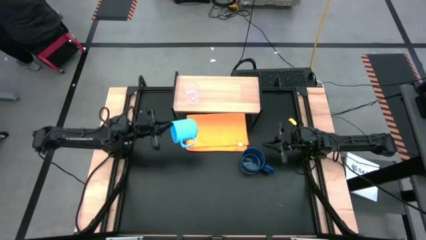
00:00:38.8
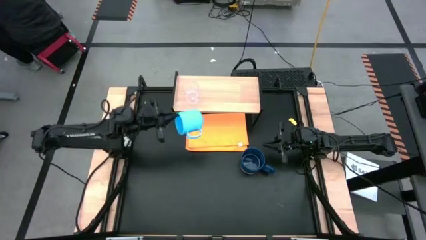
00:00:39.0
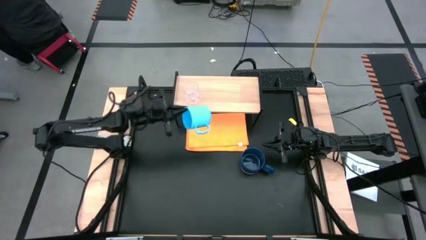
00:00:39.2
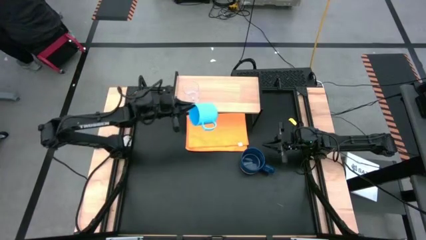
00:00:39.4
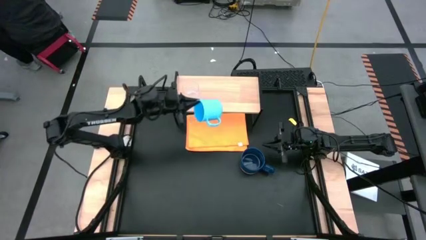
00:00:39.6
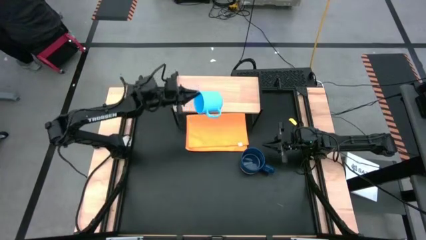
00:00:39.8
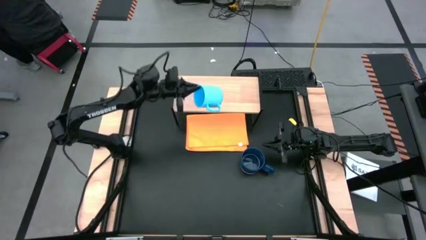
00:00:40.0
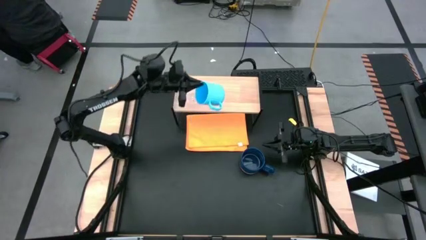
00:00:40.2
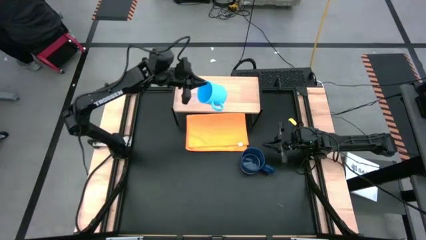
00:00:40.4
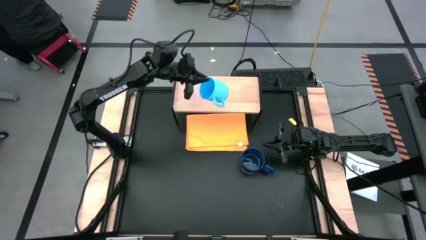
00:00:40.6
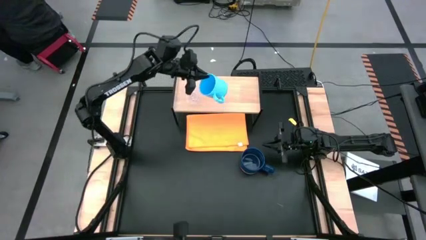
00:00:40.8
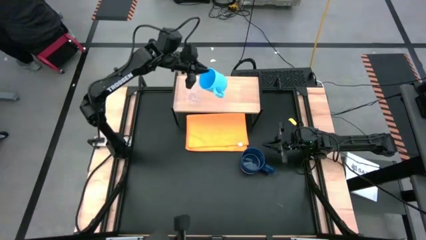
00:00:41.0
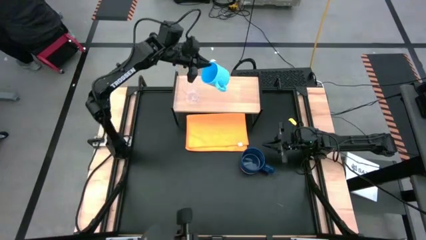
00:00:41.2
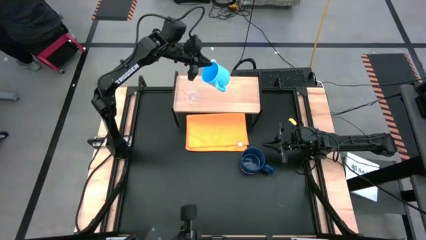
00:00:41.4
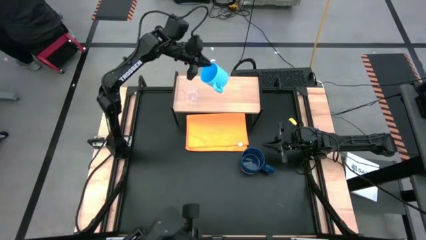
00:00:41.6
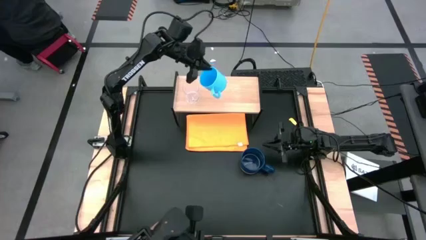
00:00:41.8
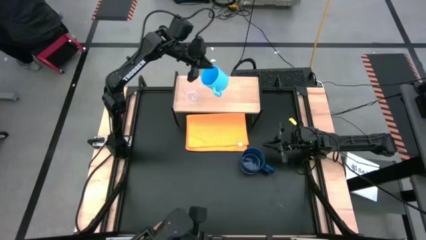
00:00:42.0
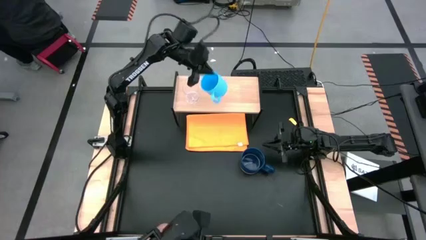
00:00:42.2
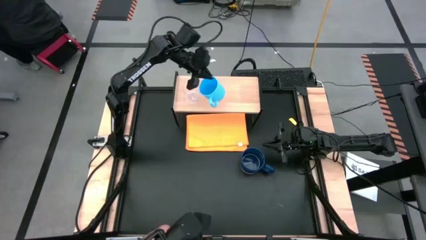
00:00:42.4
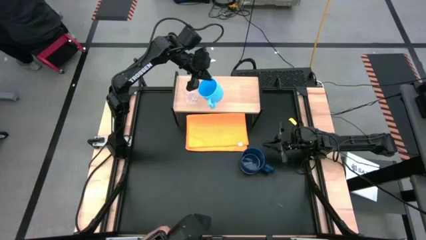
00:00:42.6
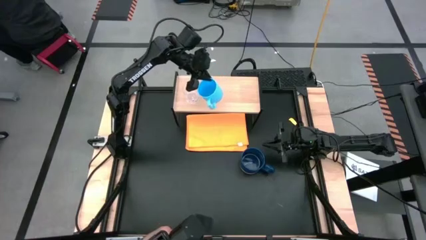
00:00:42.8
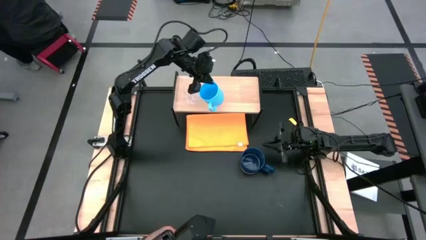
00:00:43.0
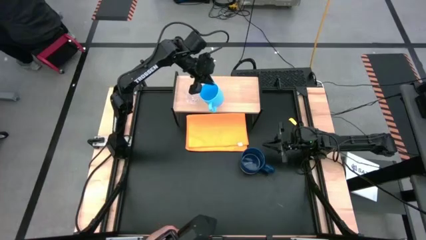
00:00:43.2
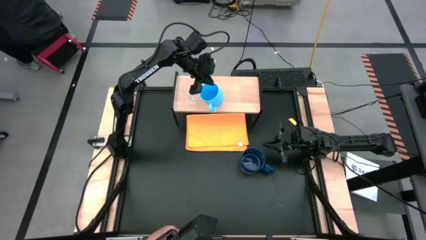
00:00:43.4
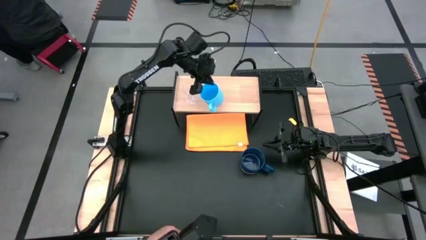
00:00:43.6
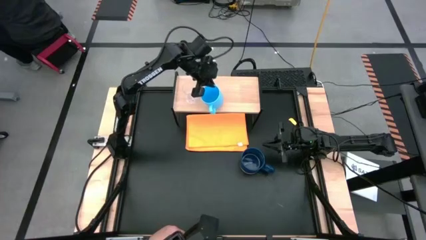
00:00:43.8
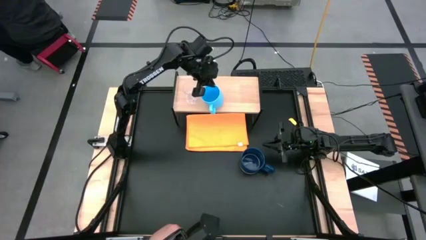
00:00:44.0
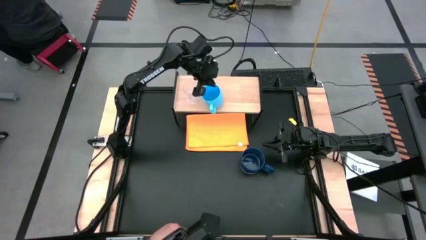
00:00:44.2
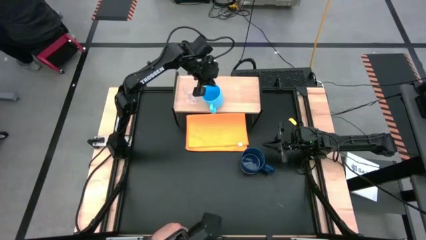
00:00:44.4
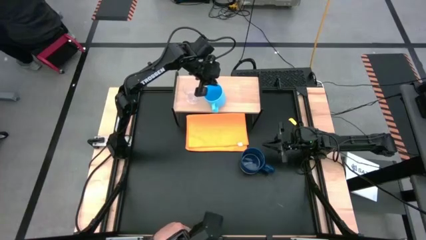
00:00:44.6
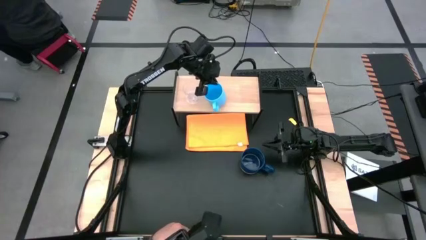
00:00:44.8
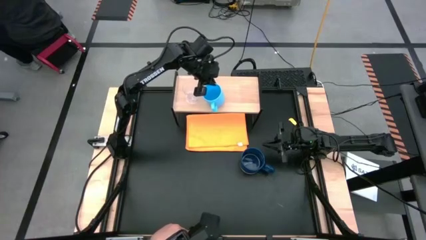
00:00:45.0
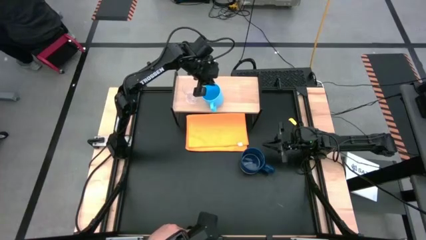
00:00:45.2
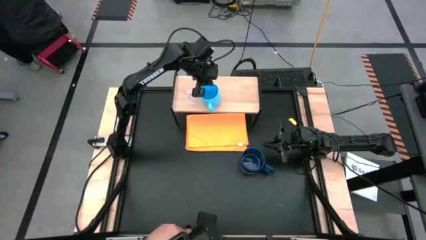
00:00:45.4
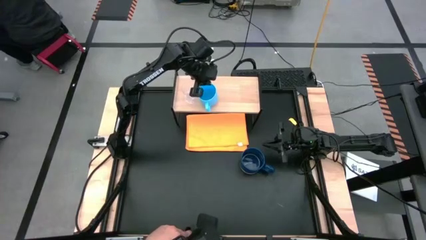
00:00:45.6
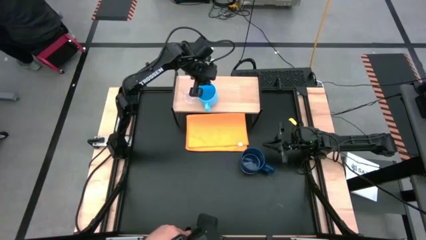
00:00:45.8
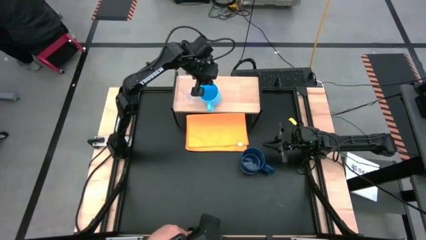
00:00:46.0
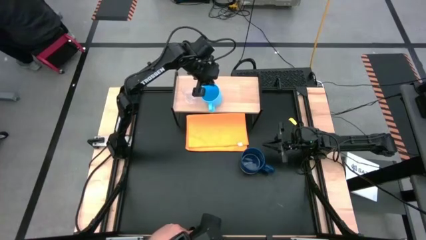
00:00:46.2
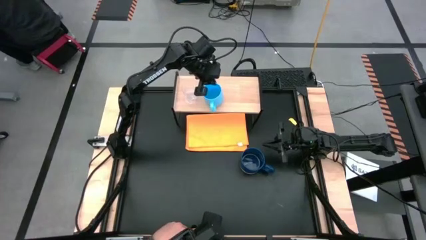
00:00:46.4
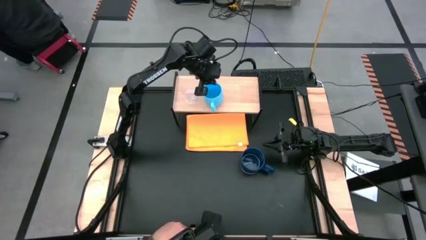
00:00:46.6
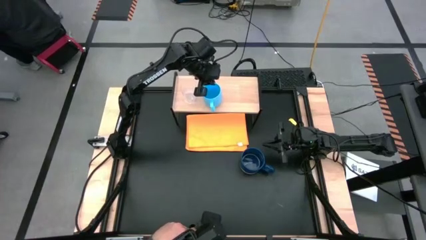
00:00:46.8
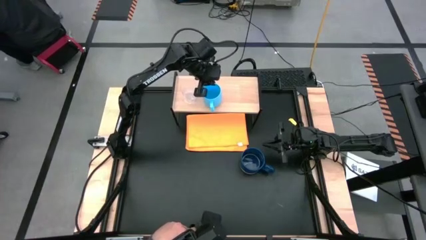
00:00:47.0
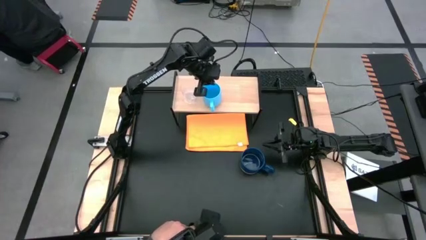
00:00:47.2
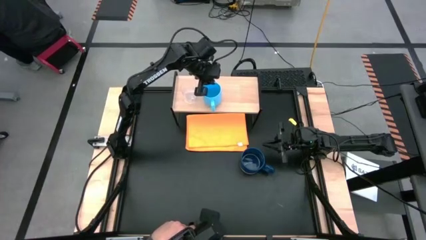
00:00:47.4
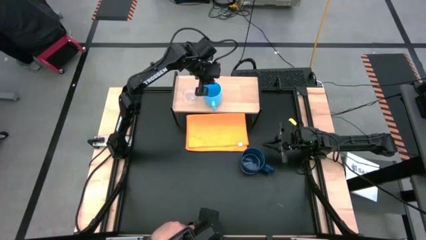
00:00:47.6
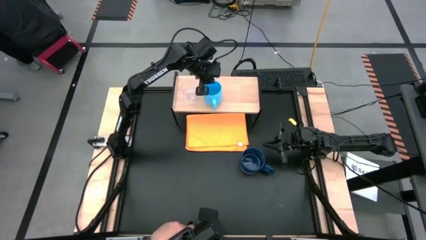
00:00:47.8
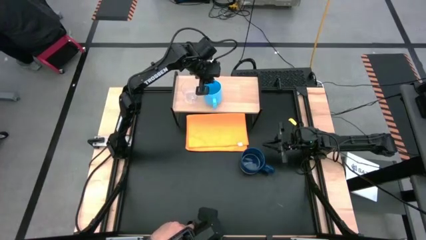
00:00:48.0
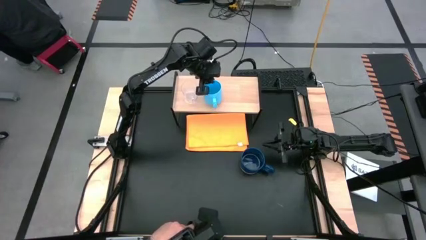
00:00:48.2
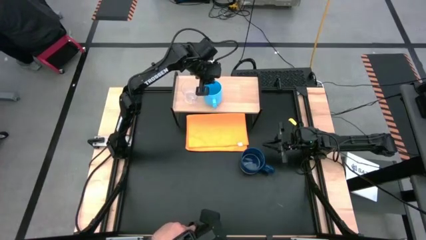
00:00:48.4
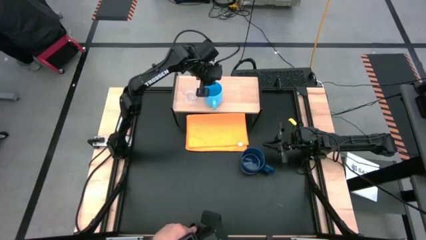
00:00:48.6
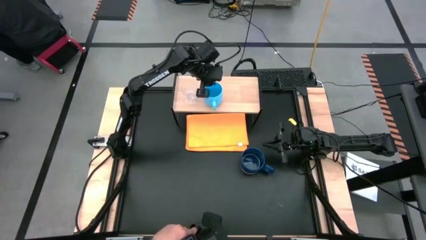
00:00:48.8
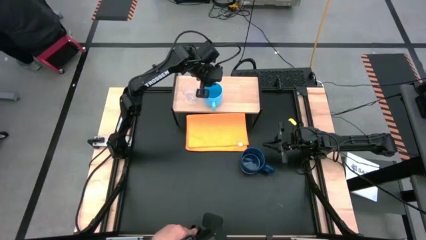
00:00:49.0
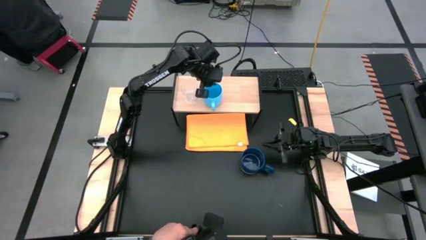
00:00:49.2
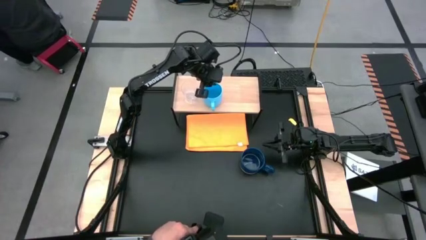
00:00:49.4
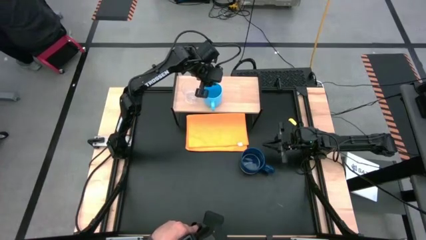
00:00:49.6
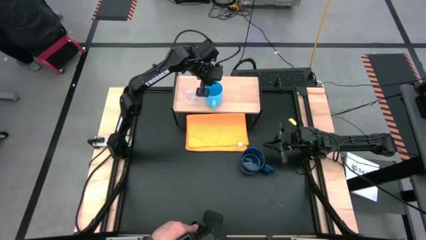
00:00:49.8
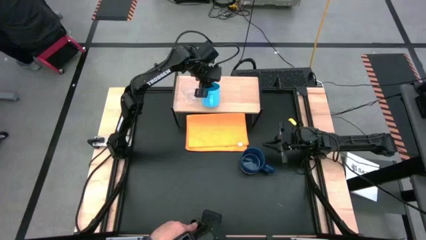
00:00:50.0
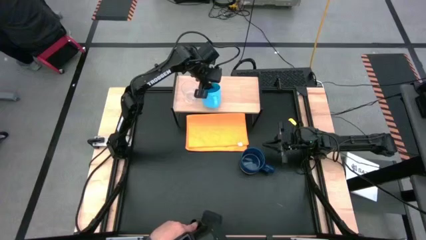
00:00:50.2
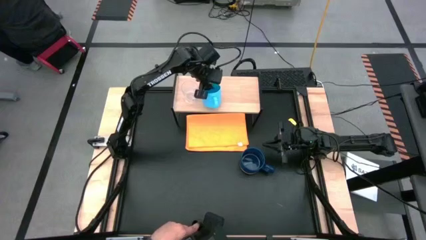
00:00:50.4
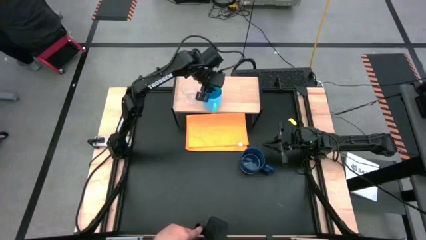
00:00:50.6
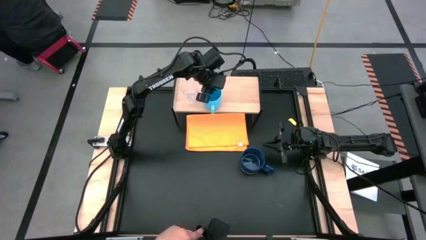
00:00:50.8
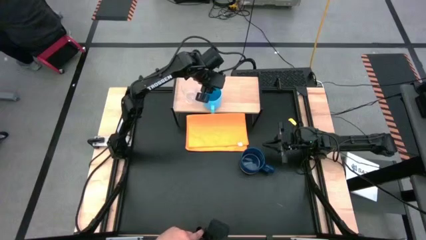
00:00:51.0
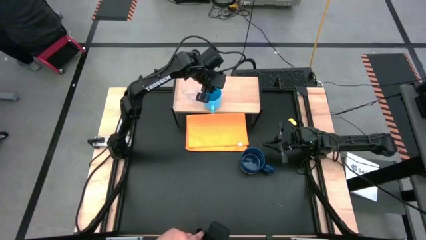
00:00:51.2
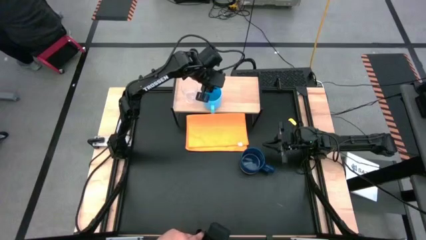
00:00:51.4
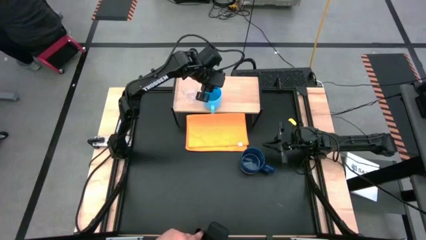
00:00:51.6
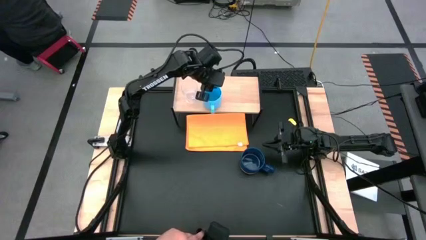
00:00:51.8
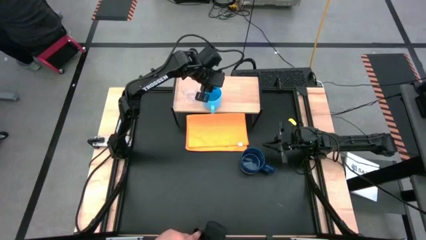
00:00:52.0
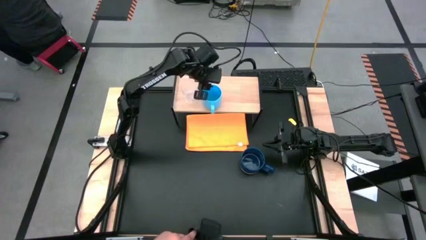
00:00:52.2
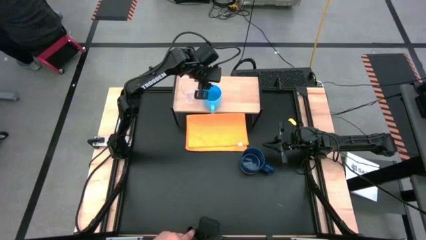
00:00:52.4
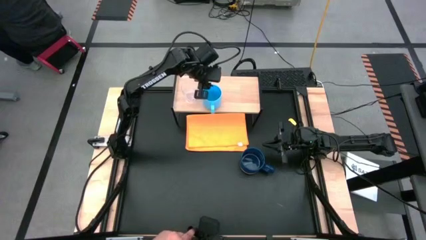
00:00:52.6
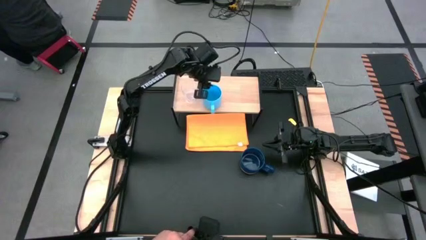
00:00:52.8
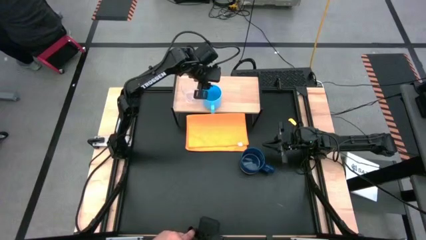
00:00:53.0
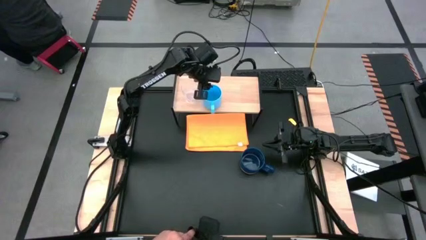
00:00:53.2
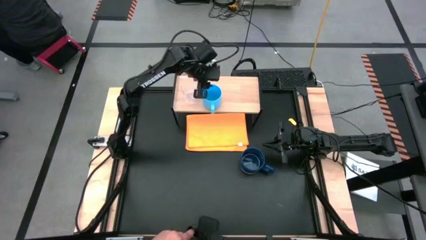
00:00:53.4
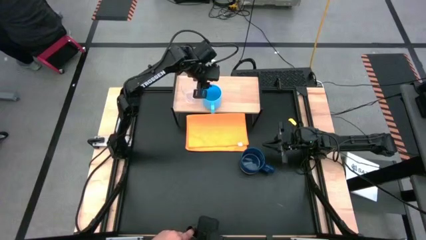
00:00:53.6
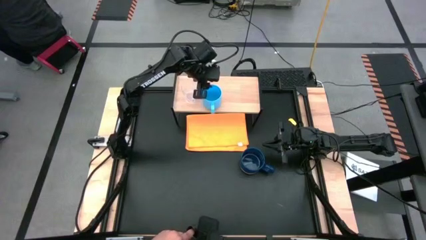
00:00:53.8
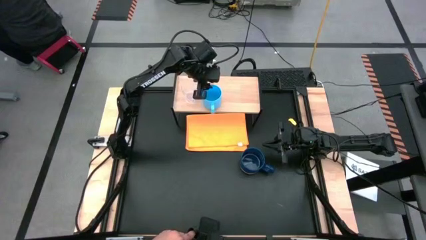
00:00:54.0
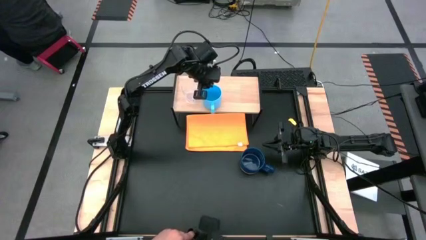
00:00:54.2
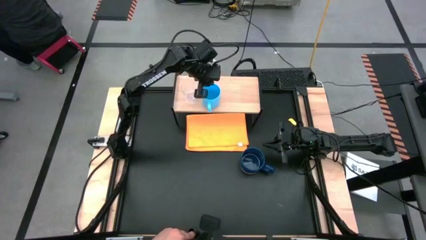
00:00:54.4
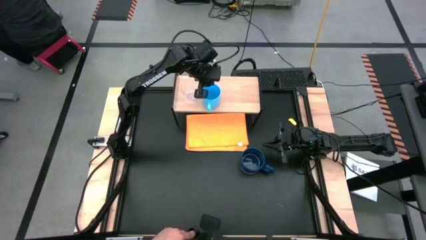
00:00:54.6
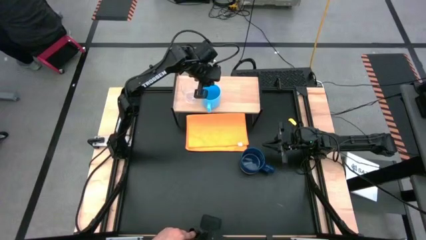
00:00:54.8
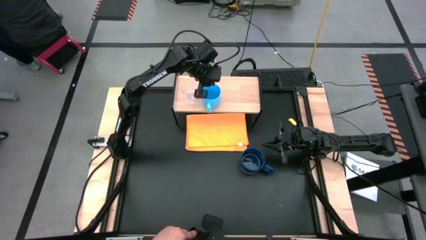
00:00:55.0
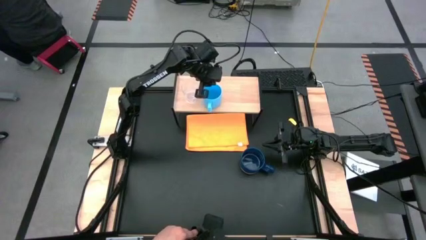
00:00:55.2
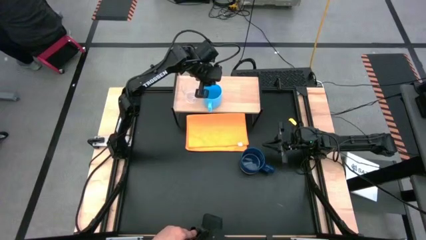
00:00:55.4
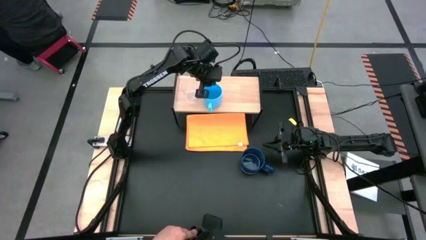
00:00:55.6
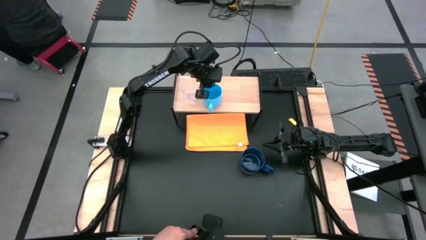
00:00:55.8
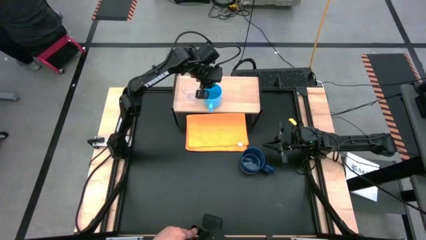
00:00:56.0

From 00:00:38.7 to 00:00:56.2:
Task: Stack small to large cups/mugs on shelf
Put the light blue mug on the shelf
